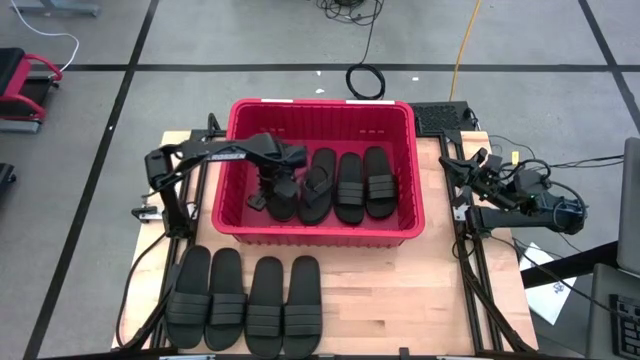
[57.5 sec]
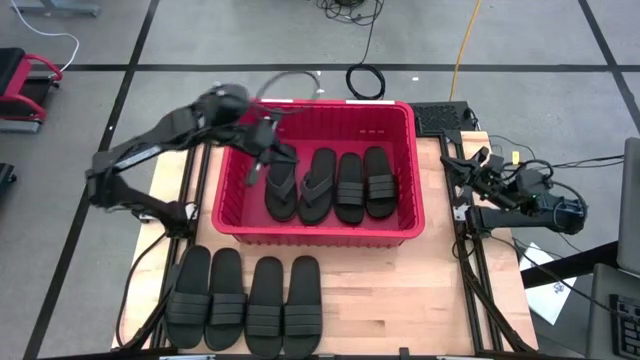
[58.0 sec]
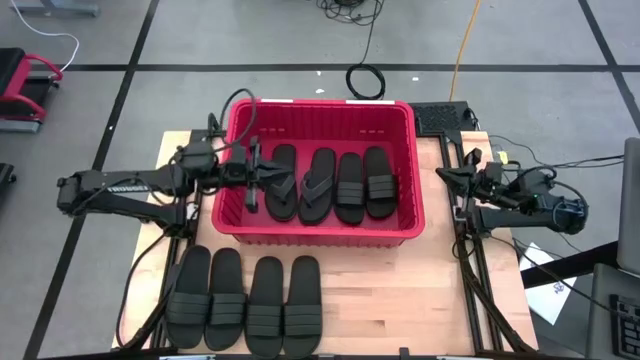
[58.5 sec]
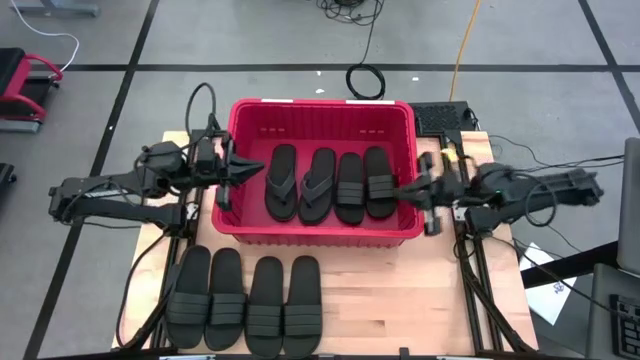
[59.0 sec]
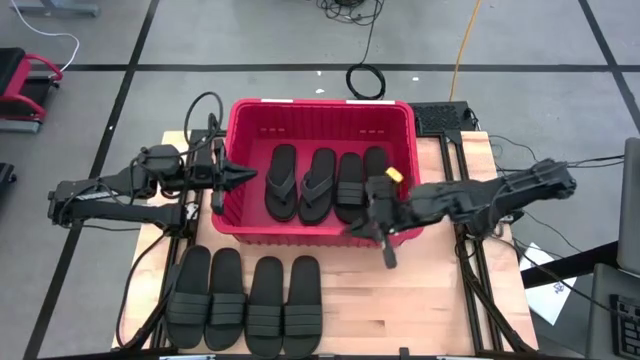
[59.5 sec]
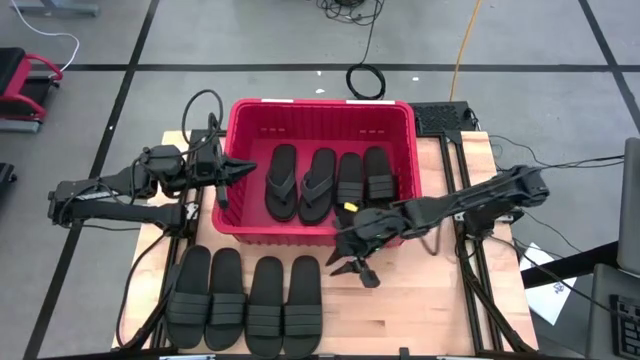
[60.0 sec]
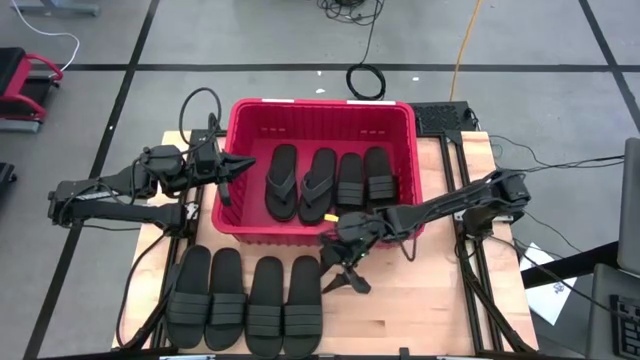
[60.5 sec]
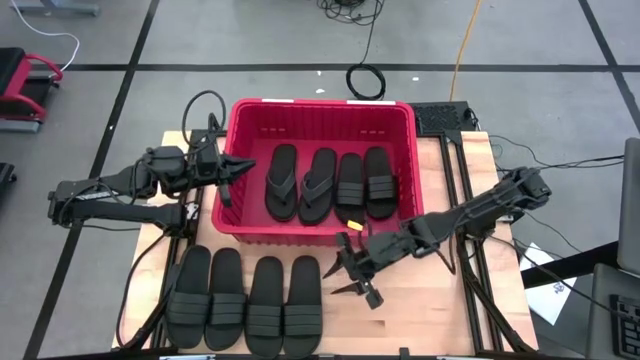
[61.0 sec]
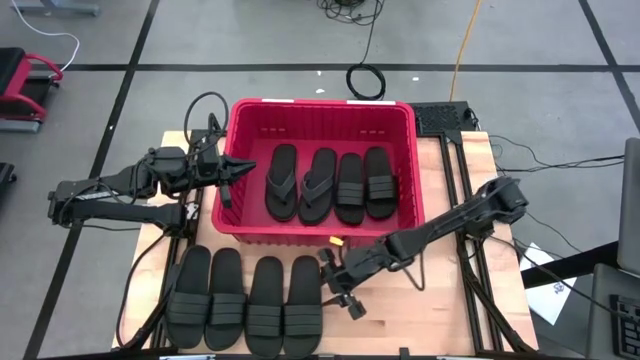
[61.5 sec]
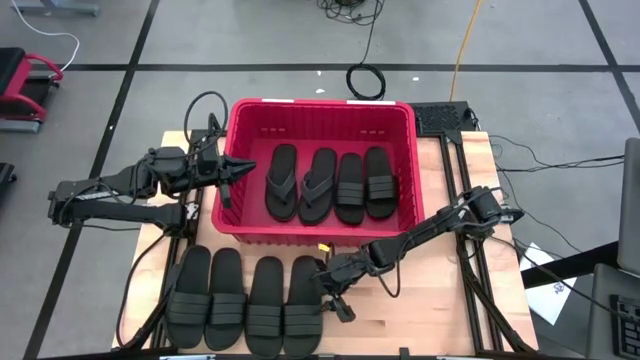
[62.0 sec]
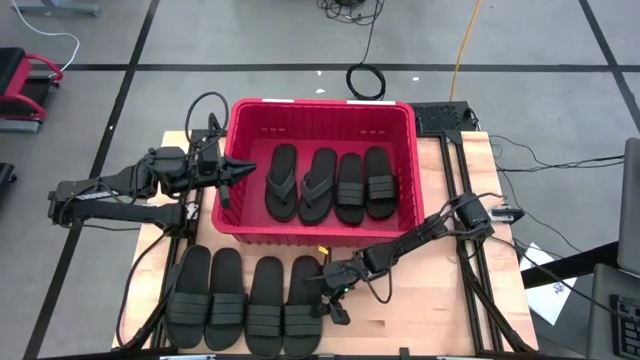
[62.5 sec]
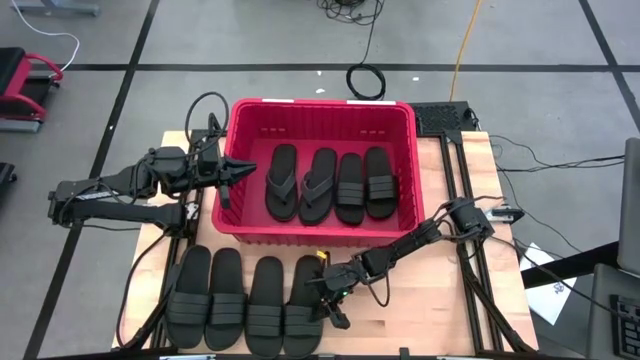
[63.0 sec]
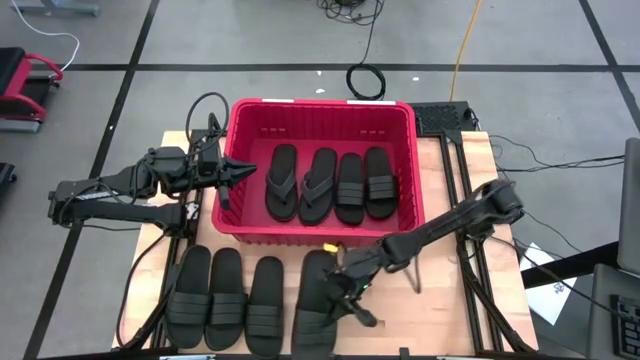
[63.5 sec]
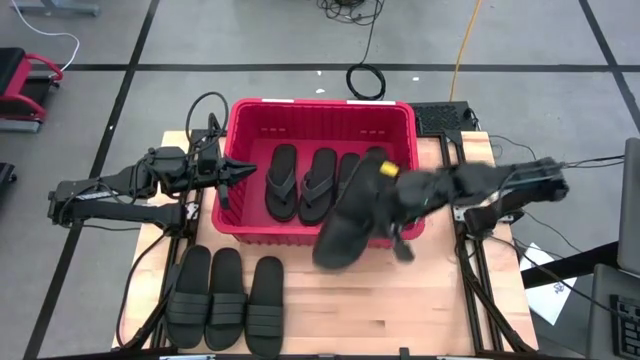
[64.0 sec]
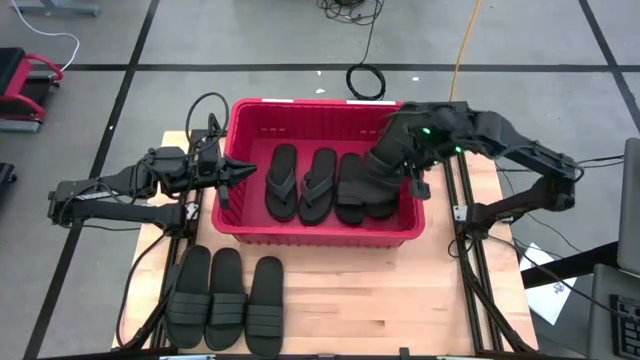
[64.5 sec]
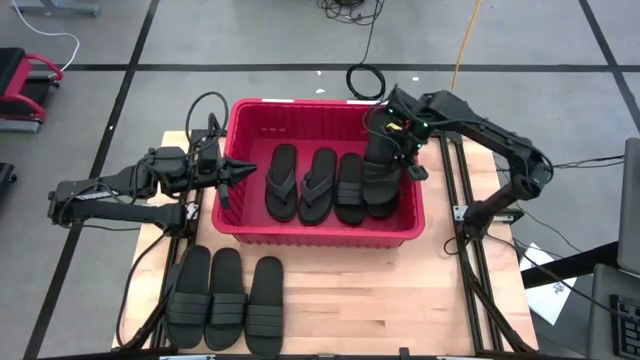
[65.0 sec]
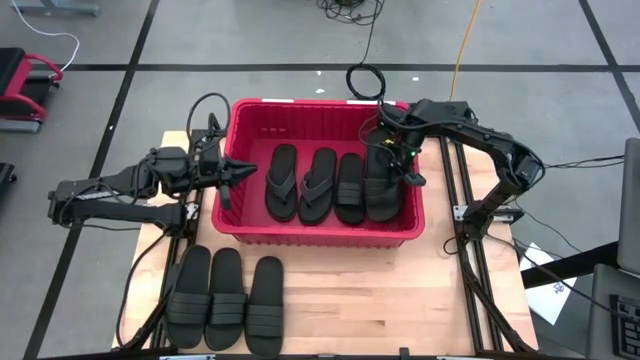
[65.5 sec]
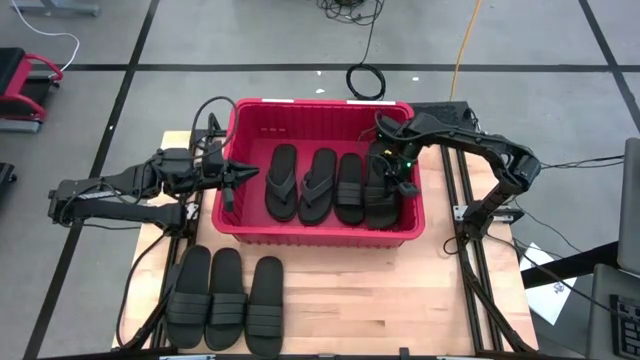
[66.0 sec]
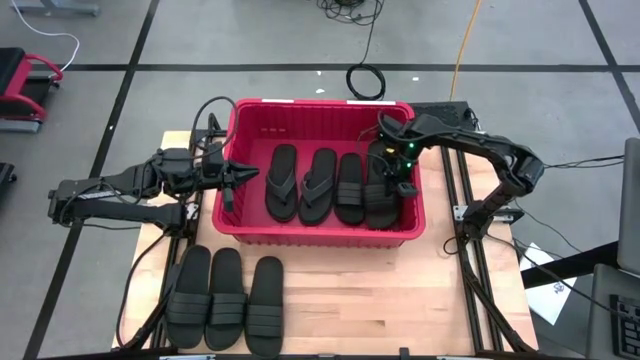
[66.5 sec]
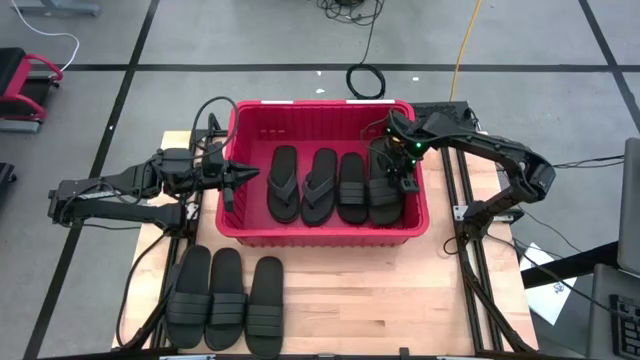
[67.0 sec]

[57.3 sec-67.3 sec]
Task: Pick and place slides into bin
Put the slide into the bin

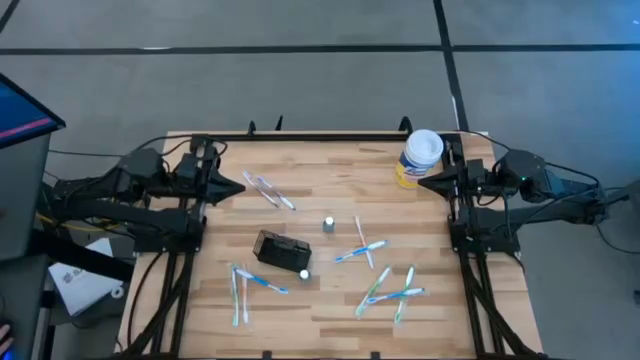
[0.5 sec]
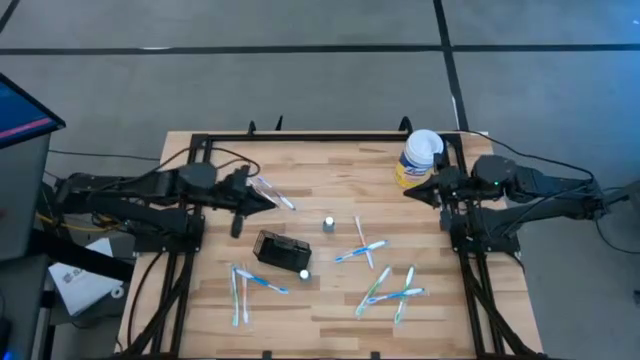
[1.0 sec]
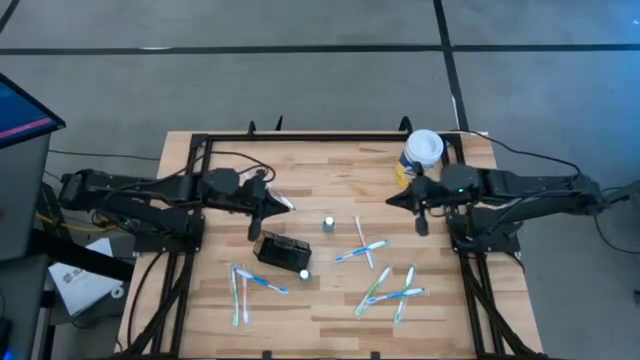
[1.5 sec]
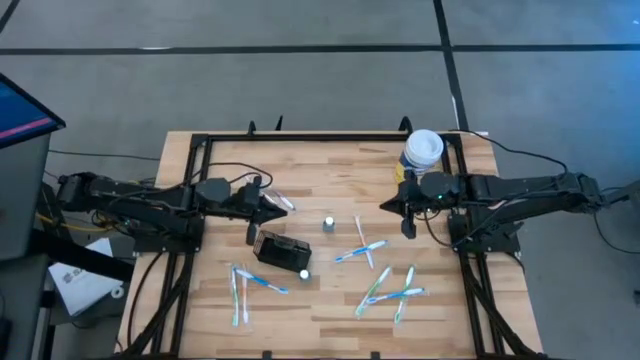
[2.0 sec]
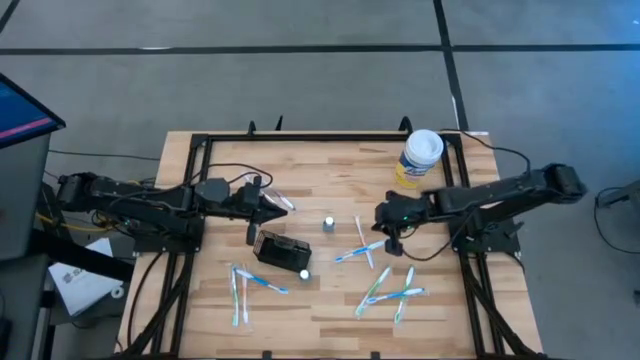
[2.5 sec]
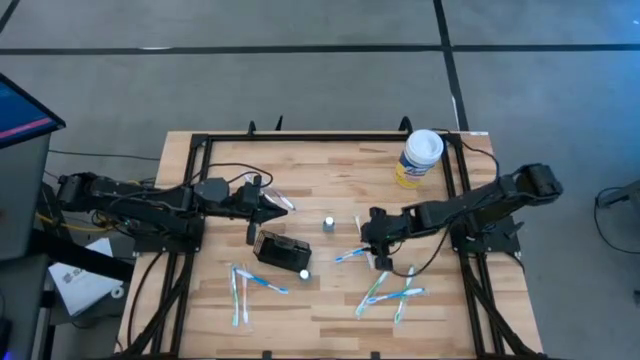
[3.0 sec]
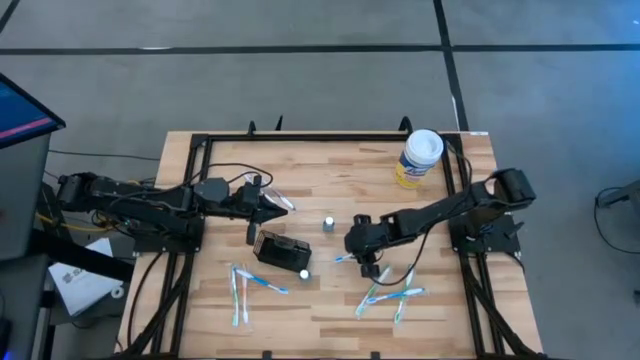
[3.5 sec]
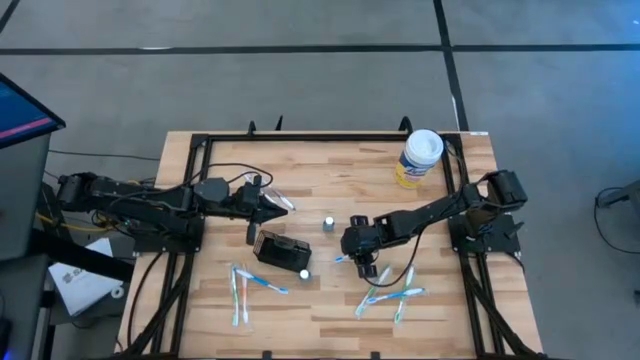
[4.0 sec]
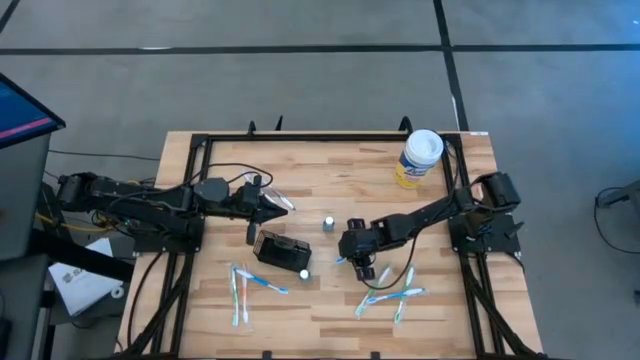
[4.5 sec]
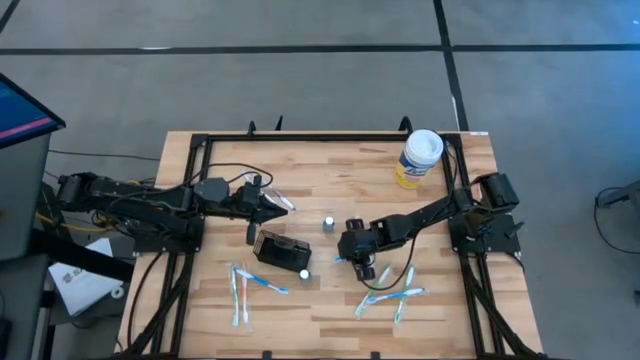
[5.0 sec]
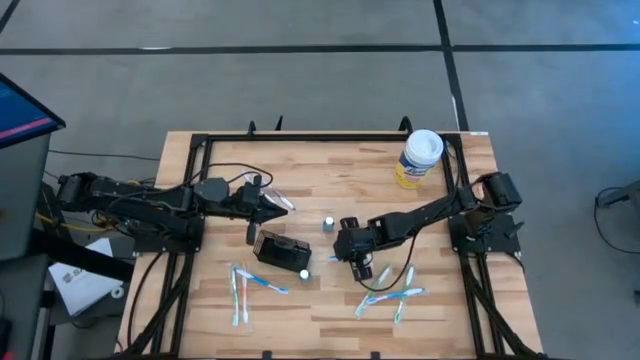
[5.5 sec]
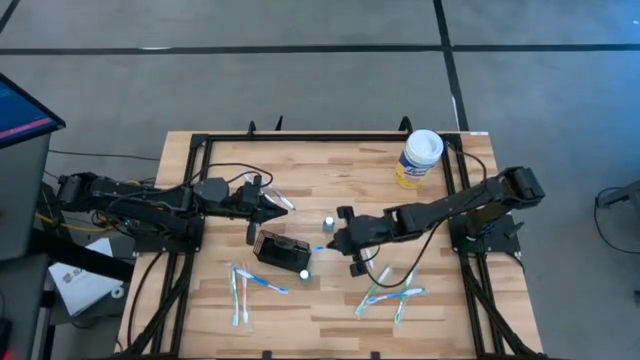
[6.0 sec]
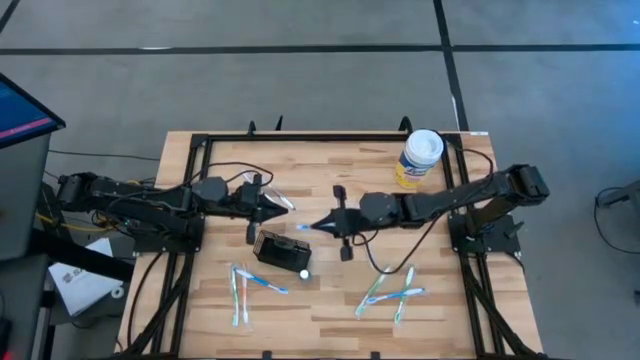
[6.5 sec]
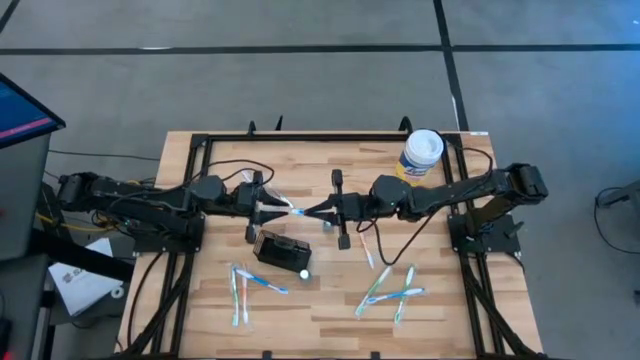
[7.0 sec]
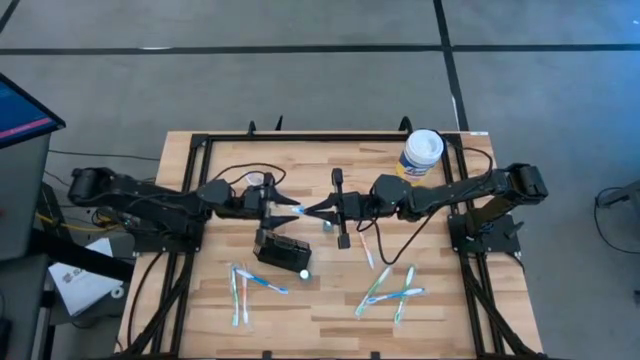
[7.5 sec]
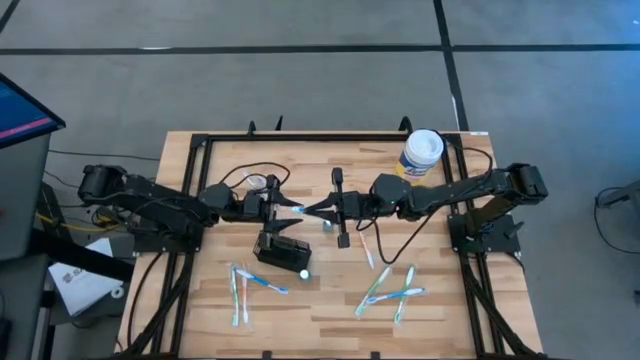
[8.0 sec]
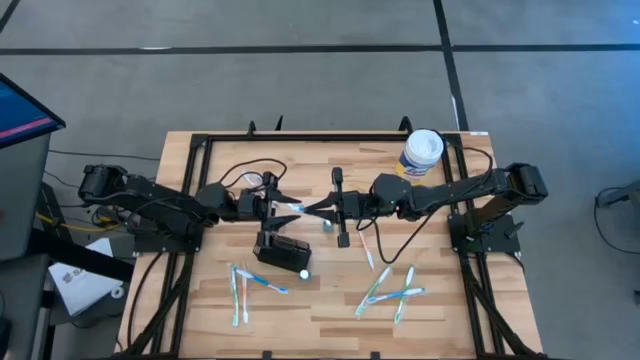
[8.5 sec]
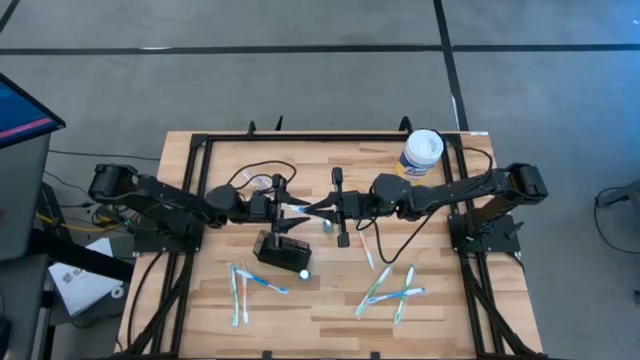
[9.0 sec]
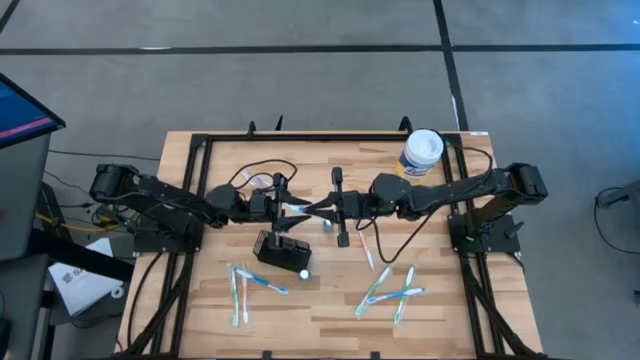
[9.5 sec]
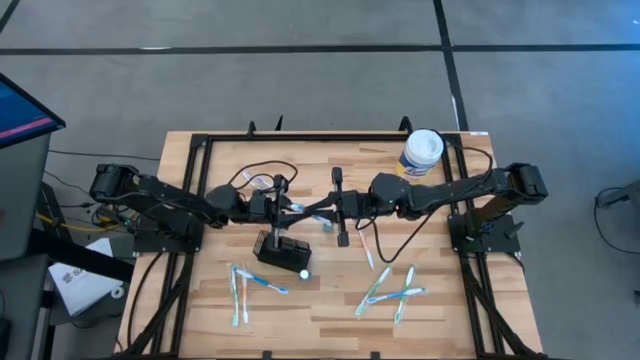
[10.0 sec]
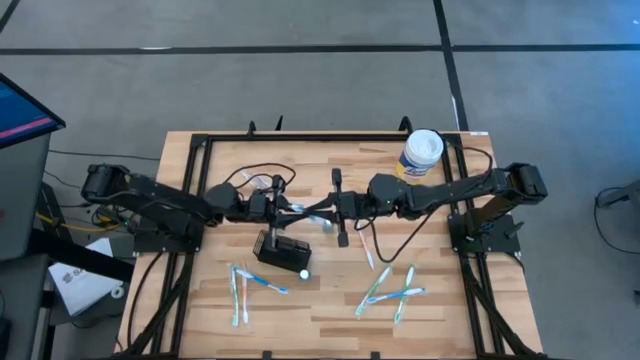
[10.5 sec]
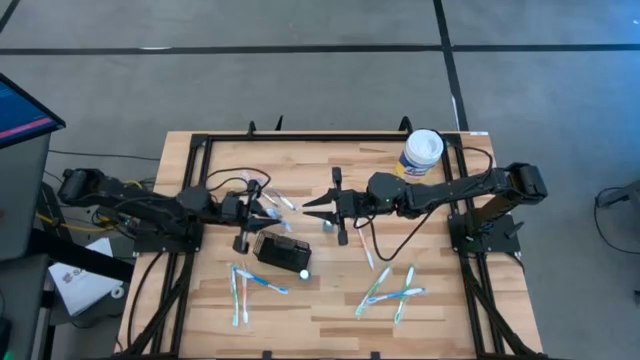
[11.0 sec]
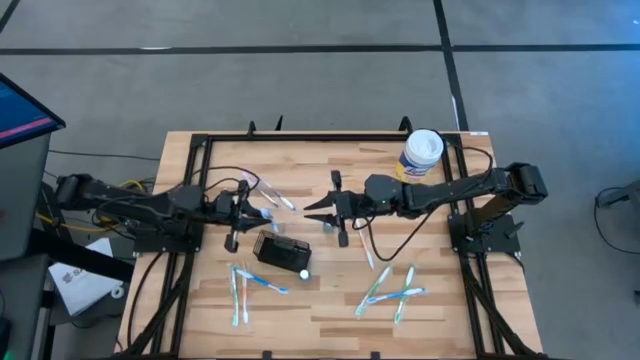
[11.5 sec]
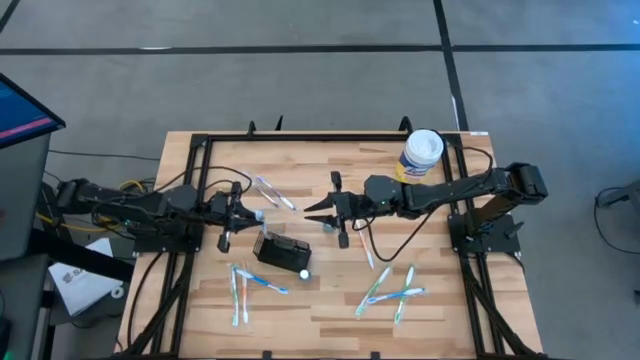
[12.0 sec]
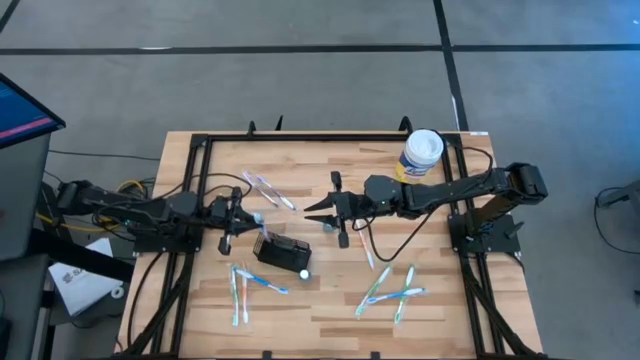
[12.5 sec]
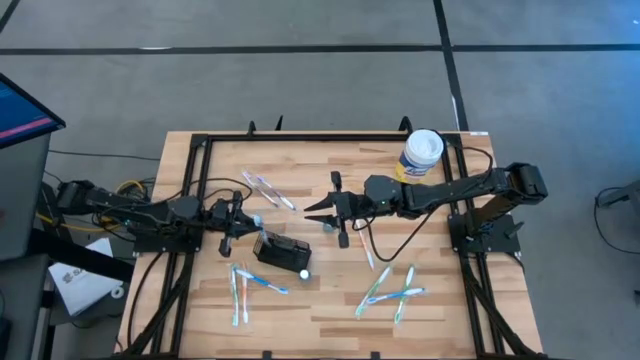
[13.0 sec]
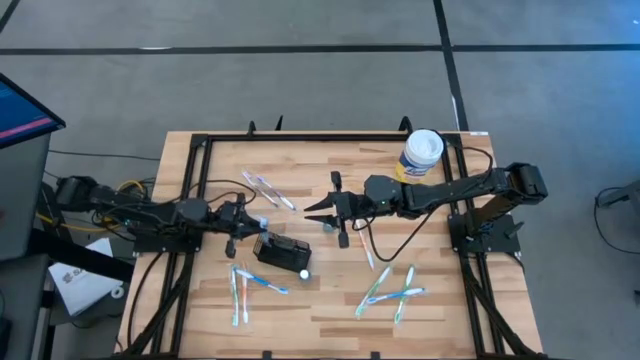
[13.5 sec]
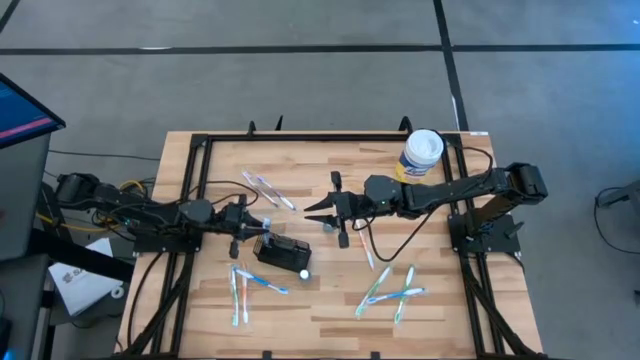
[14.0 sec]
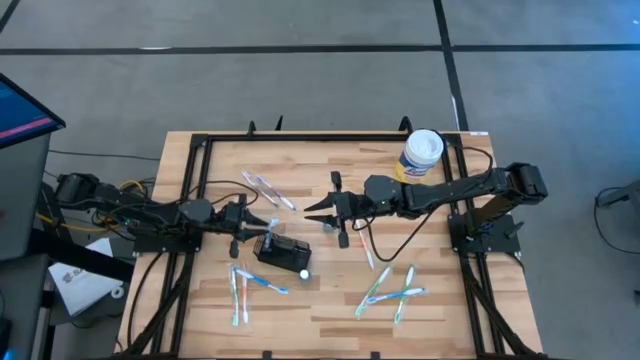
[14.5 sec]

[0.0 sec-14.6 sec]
Task: Pick & Place toothbrushing station
Put the top blue toothbrush into left compartment of the wire organizer
